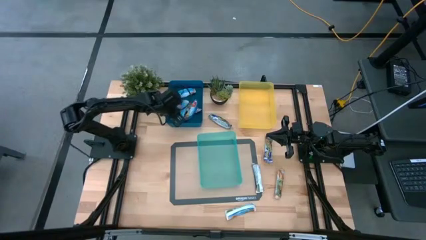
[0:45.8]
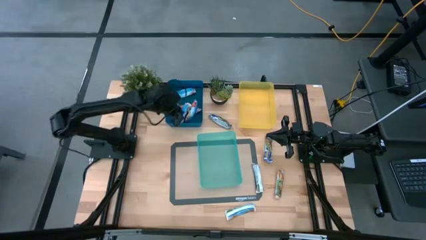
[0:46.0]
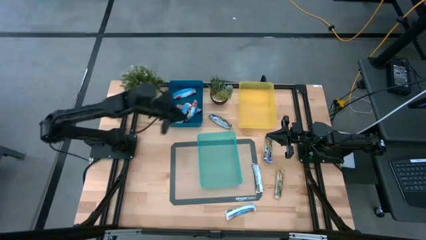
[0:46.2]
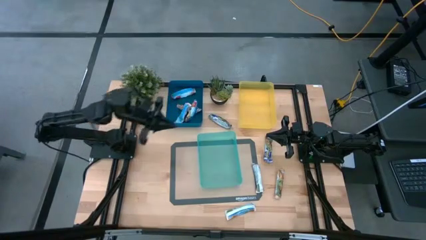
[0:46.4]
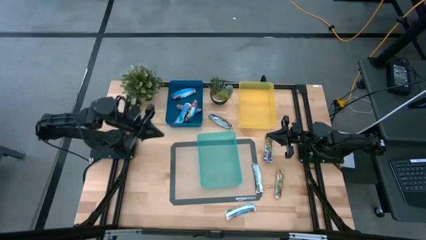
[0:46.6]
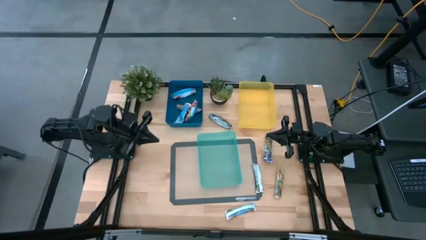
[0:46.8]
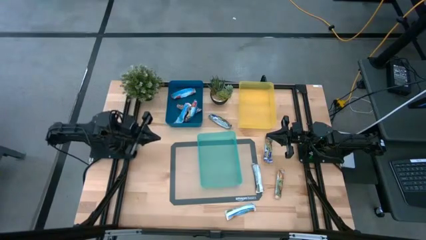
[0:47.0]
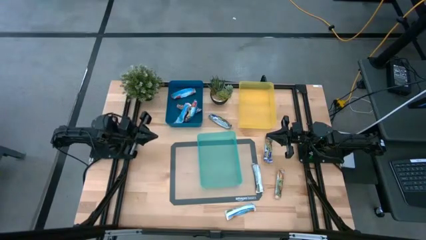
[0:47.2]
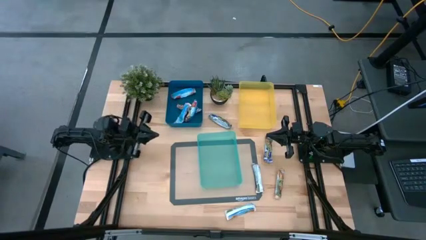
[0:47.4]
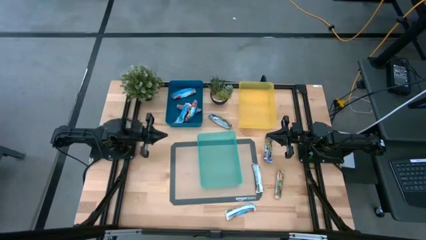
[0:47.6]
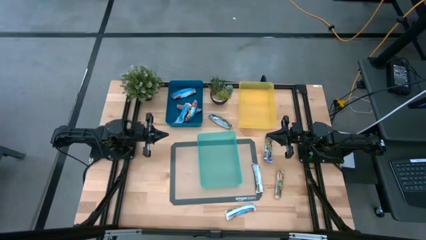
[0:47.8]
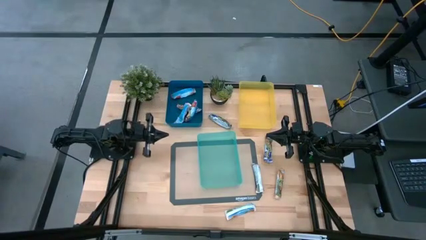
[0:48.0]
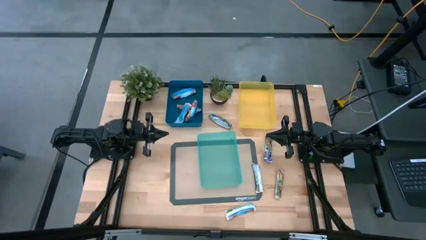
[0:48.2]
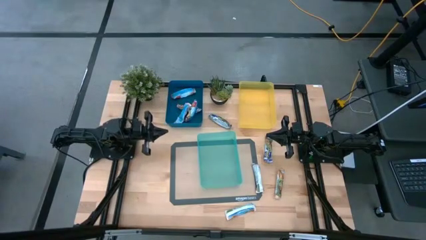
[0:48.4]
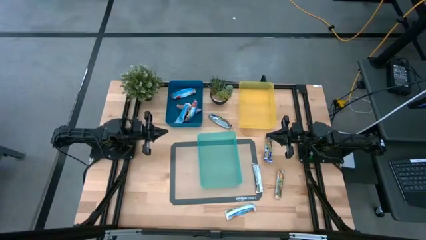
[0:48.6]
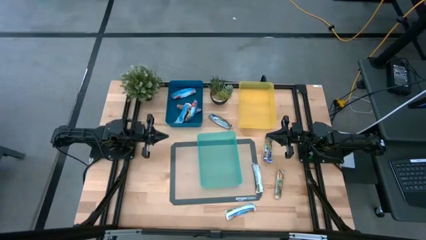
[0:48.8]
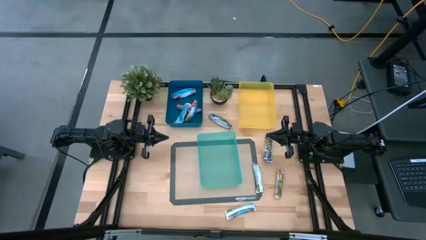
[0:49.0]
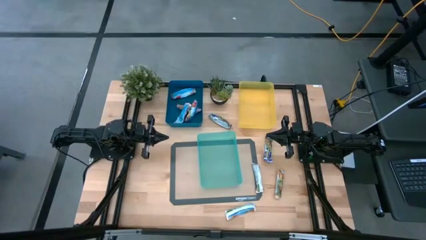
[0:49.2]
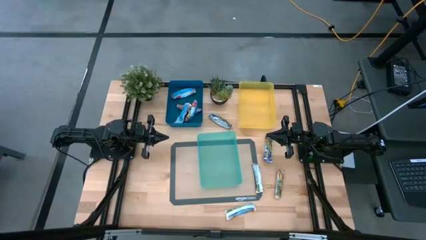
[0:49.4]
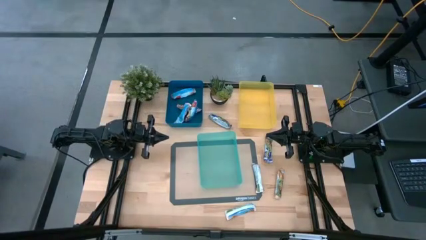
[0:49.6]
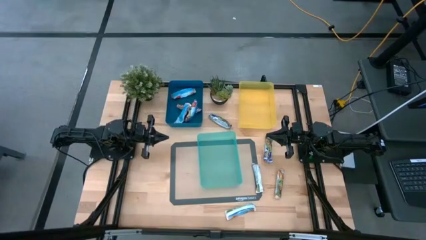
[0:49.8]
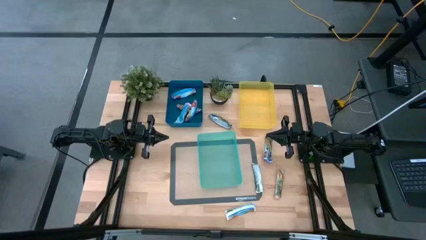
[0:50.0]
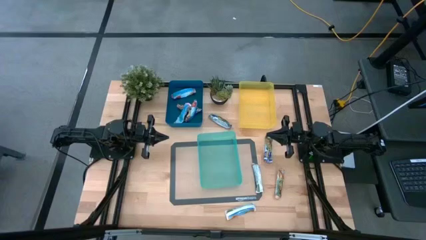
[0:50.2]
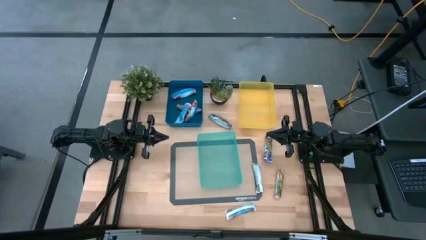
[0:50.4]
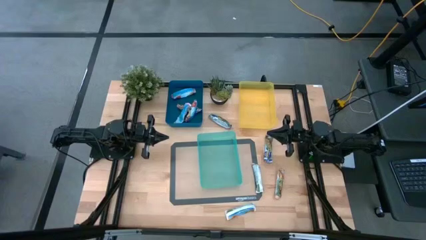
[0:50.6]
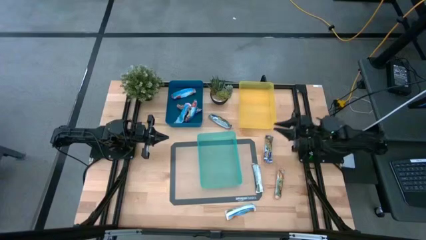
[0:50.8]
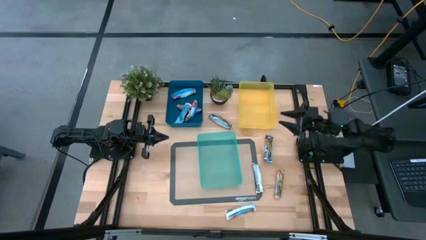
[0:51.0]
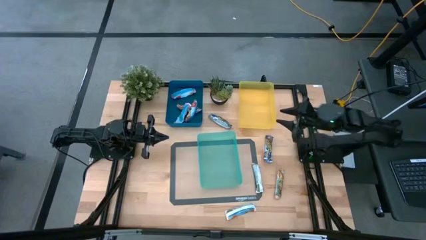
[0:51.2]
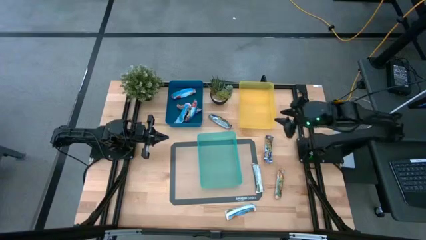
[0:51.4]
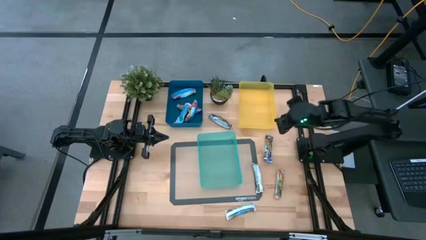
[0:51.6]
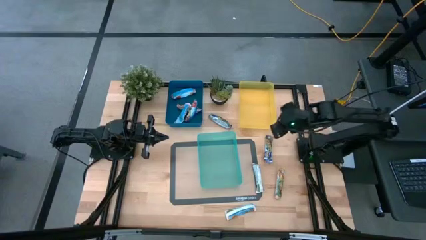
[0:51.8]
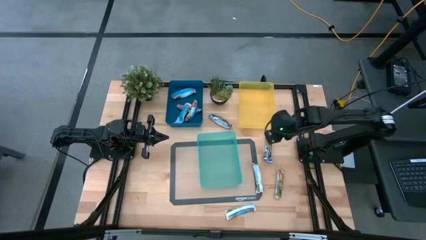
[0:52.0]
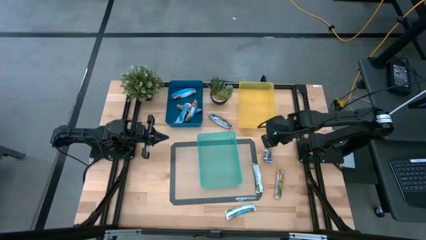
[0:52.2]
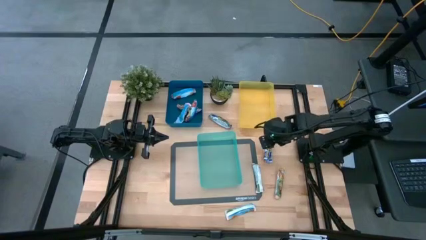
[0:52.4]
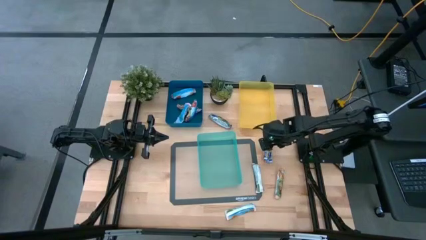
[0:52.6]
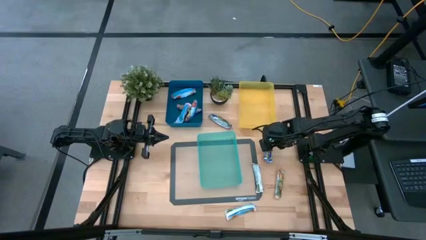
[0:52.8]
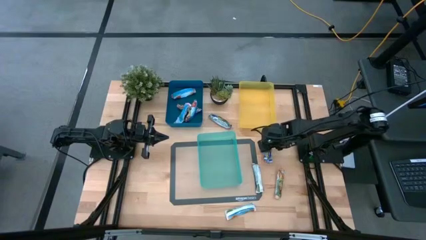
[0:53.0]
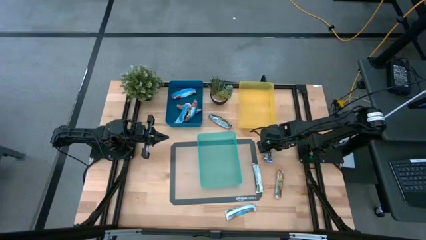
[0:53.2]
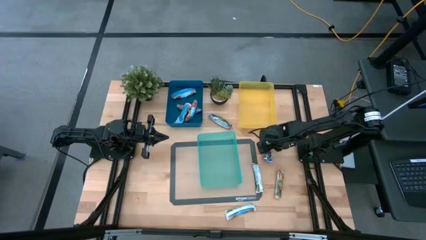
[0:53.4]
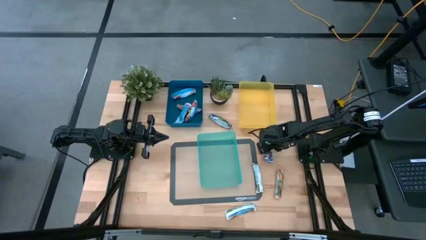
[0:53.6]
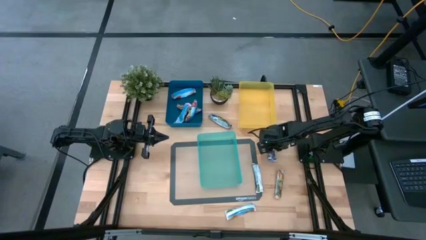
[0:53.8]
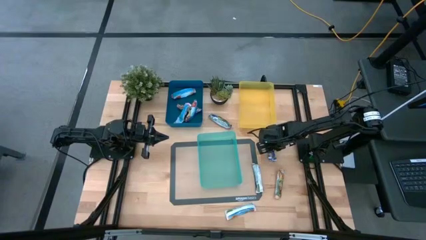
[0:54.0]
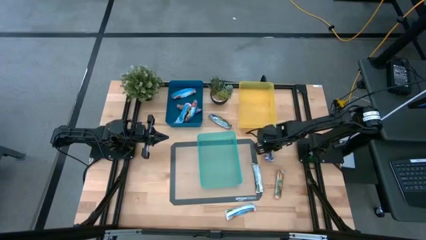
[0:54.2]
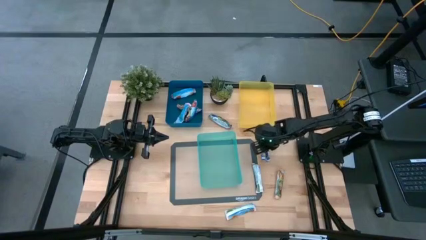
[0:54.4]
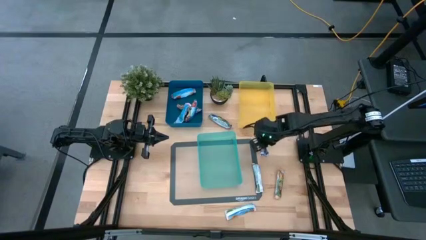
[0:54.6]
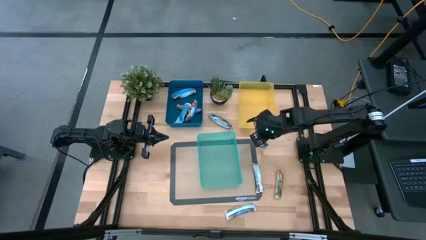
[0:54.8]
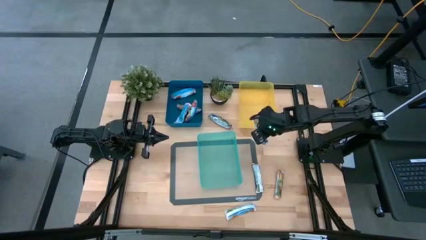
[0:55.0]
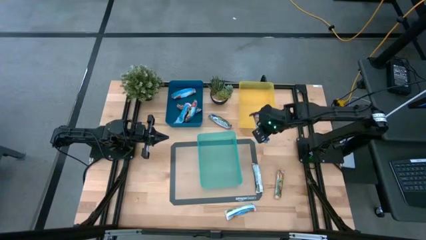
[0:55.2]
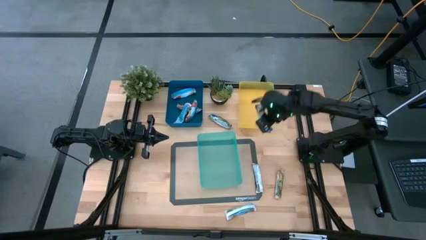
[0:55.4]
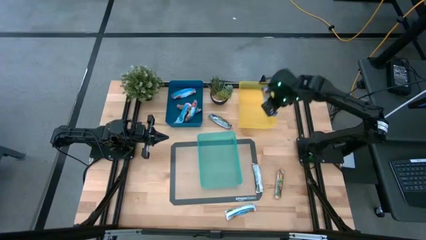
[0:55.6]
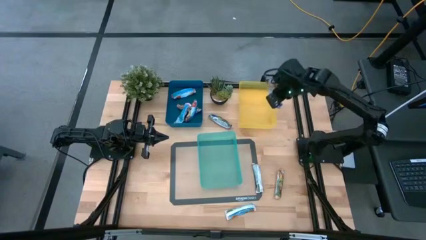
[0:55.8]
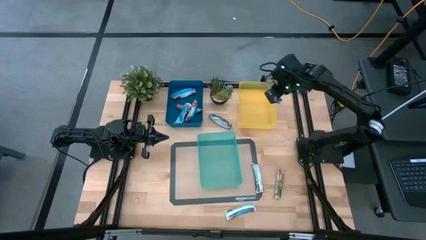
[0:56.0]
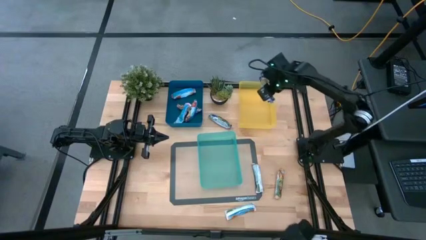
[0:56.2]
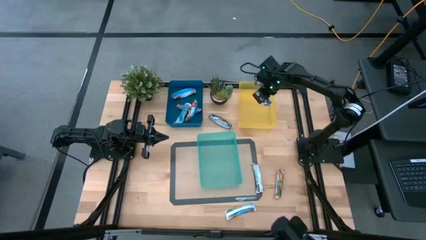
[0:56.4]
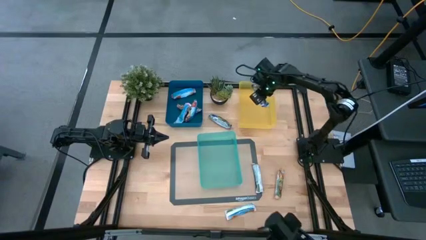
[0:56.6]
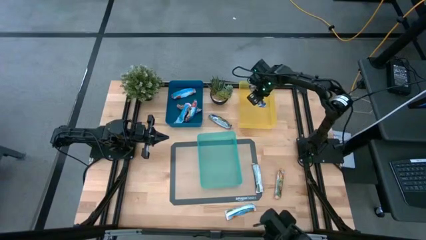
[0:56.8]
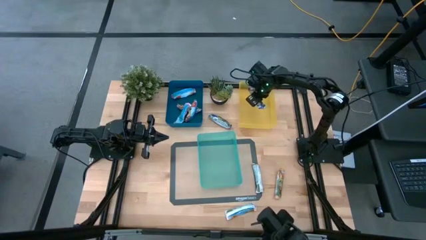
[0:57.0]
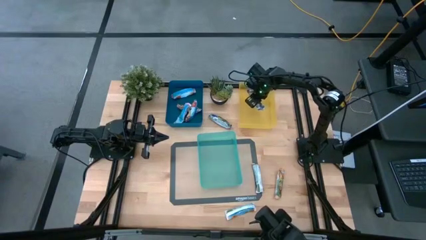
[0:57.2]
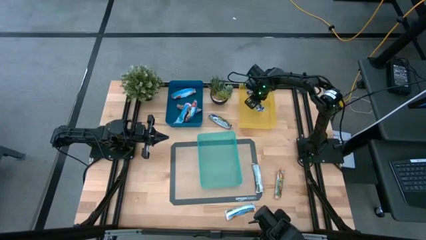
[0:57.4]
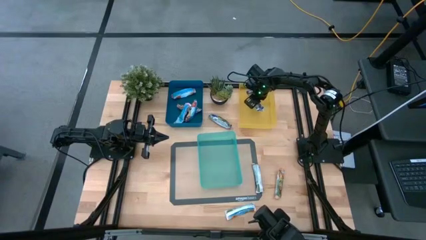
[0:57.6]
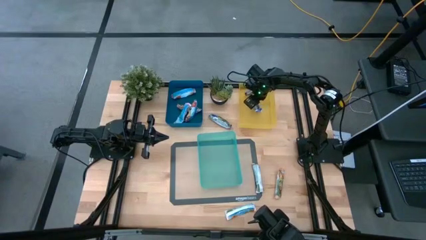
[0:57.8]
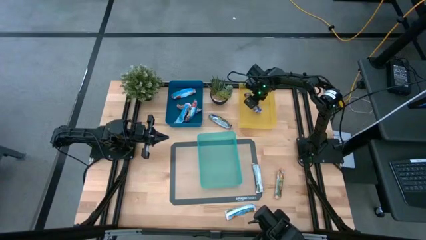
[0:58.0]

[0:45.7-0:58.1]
Task: Pick and place Granola Bars by type
Put the blue granola bar into the yellow bin

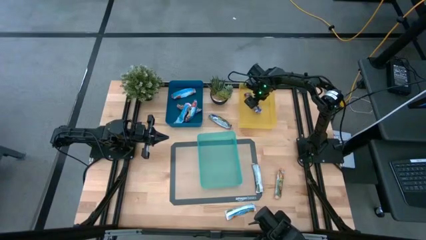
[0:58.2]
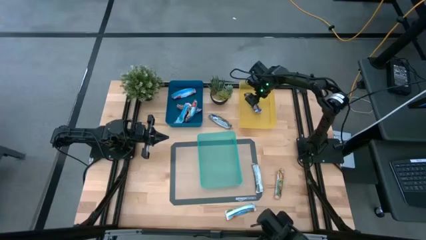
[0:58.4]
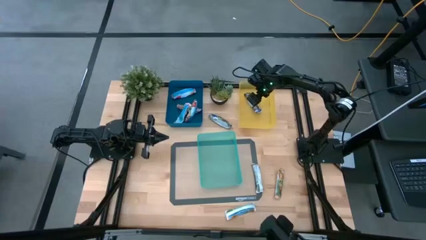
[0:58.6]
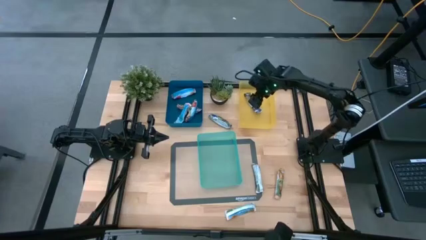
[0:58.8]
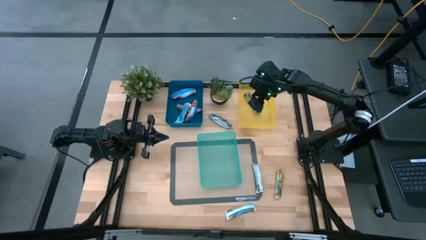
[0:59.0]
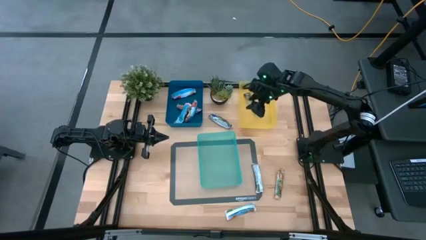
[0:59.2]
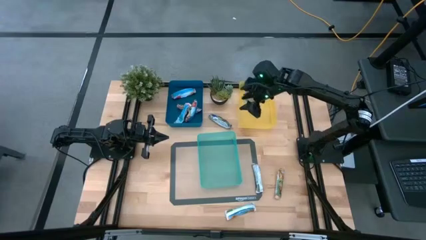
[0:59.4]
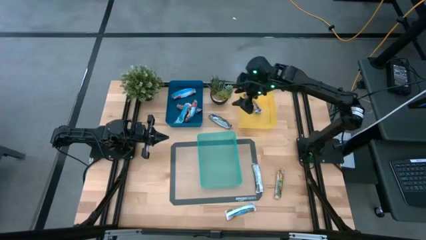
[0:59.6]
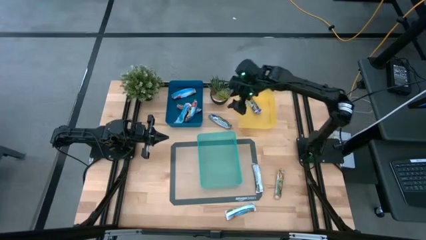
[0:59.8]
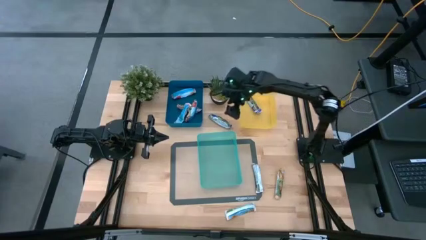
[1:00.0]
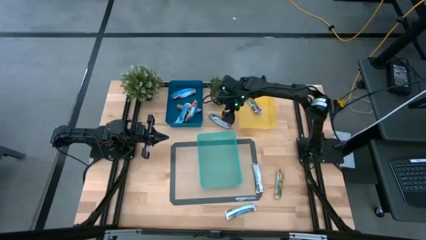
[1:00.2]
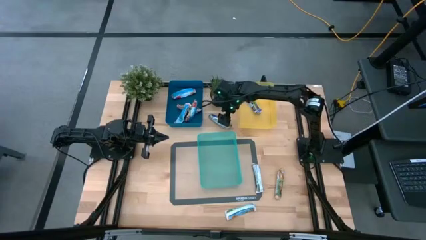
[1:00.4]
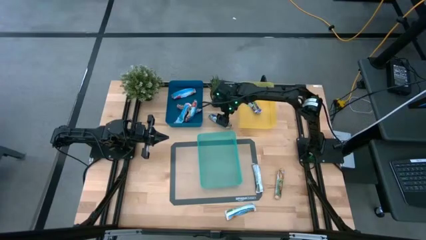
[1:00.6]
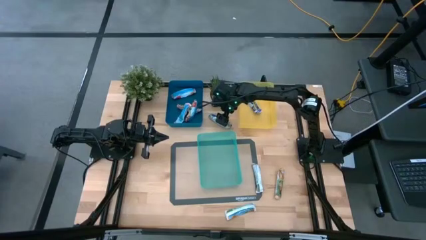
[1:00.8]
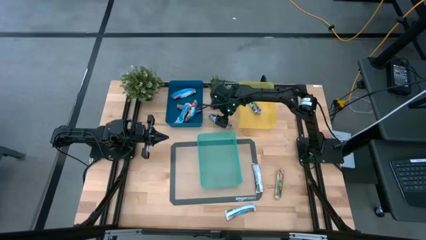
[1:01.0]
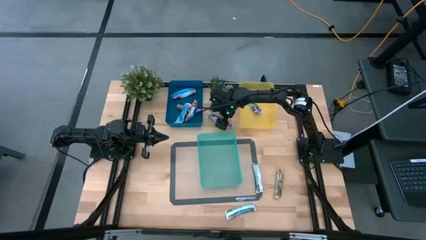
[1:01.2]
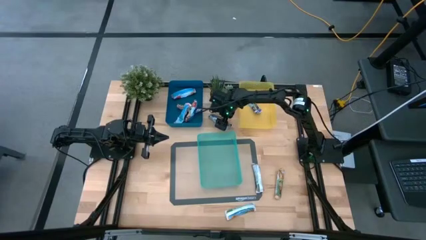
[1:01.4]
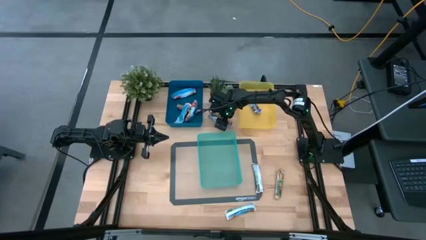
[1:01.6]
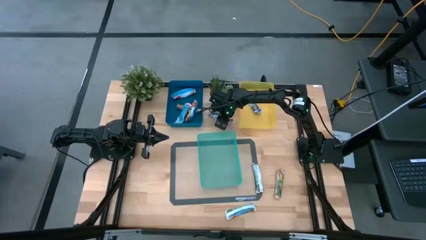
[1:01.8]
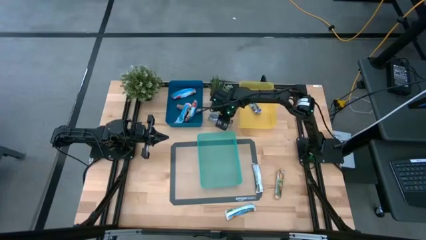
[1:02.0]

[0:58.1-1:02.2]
Put the blue granola bar into the yellow bin

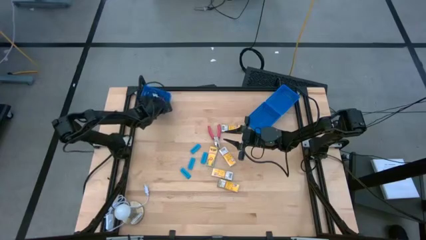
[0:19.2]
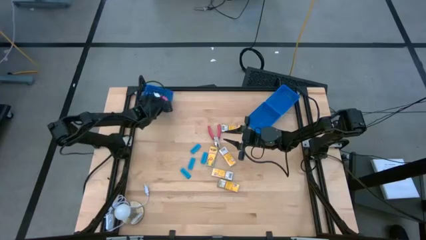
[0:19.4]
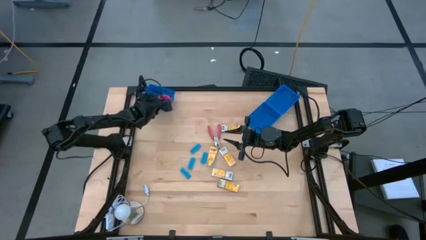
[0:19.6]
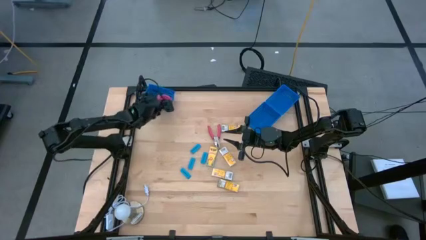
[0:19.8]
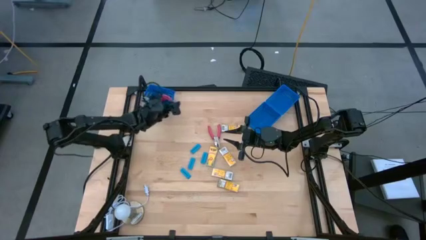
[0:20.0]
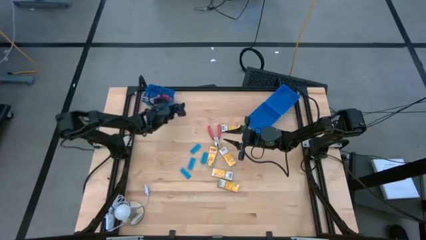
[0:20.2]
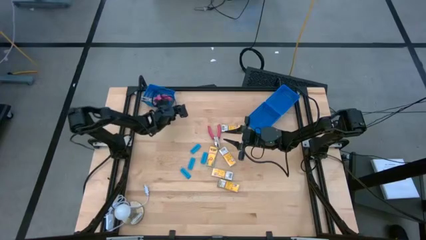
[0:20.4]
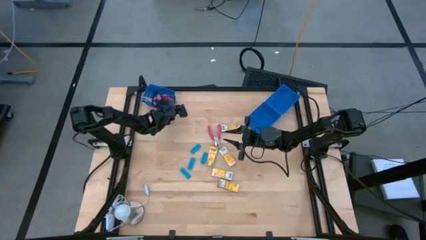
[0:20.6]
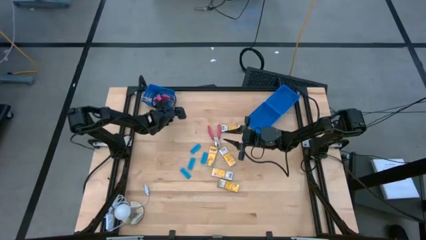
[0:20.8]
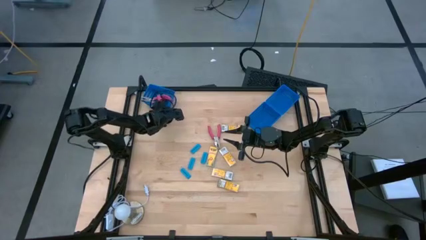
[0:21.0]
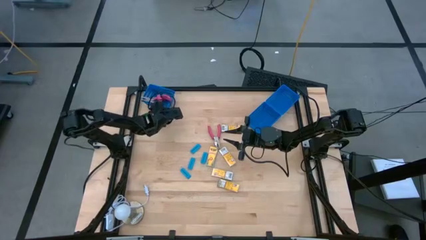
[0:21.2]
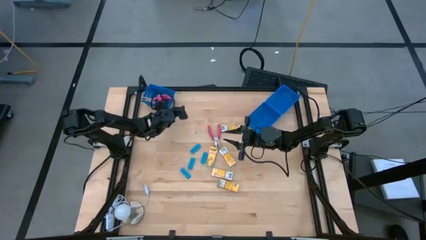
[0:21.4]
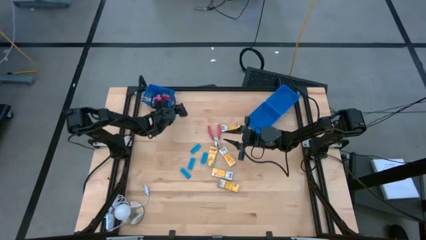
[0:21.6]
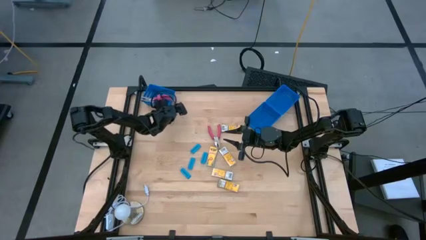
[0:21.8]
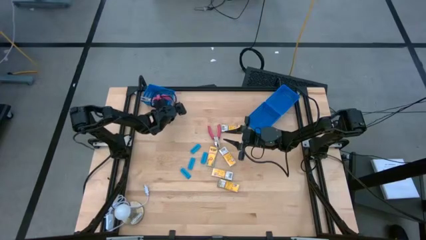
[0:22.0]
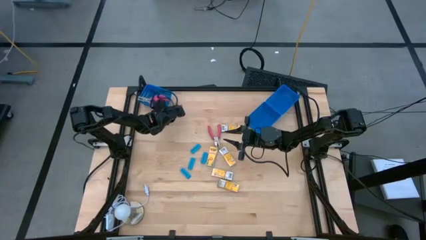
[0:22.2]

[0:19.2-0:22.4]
Task: Pick & Place School Supplies
Adjust the blue basket
